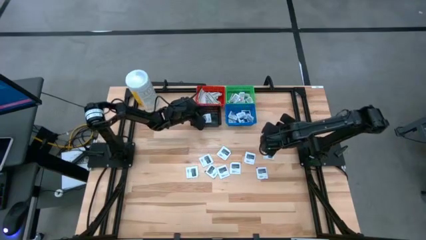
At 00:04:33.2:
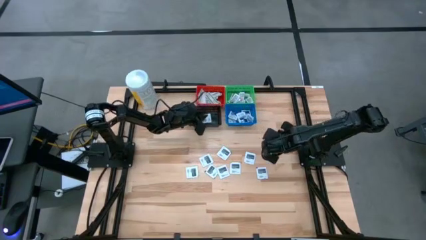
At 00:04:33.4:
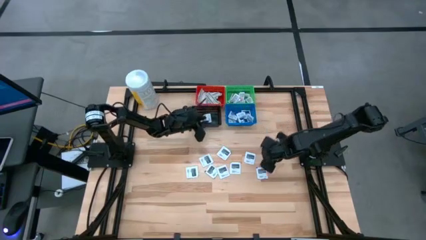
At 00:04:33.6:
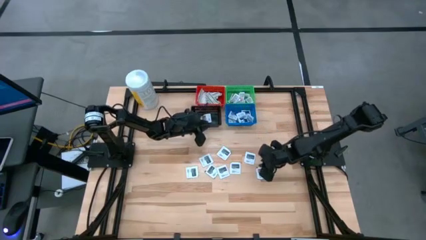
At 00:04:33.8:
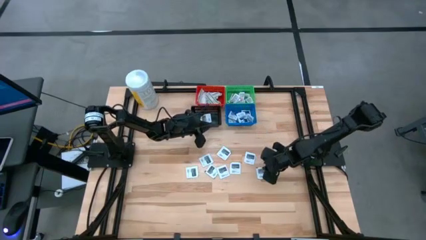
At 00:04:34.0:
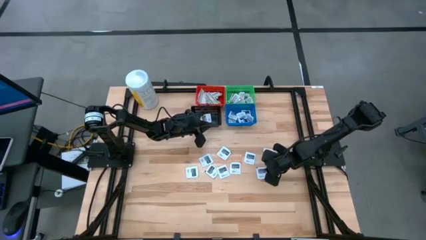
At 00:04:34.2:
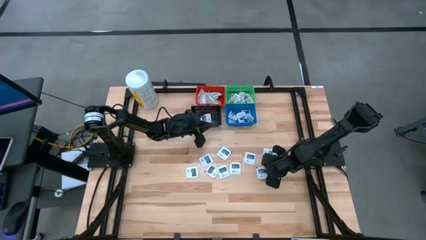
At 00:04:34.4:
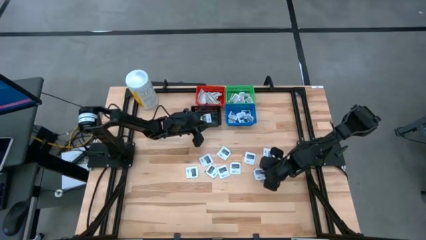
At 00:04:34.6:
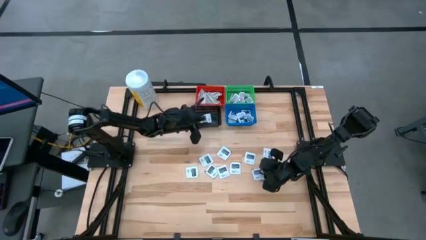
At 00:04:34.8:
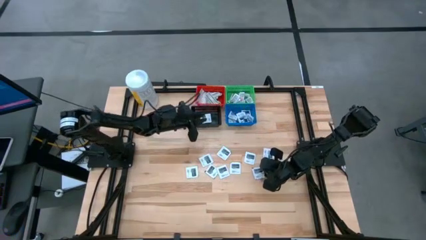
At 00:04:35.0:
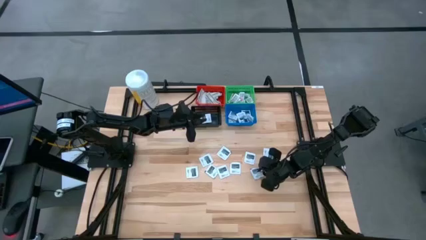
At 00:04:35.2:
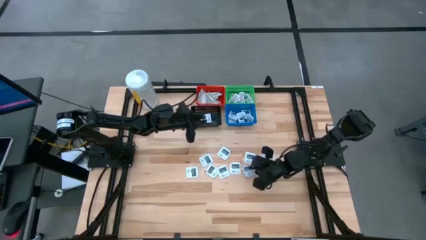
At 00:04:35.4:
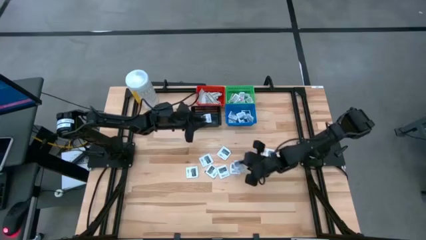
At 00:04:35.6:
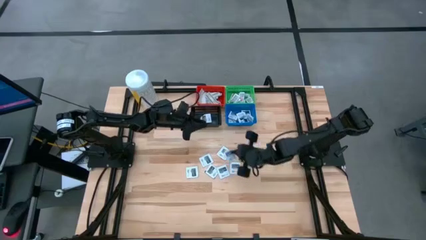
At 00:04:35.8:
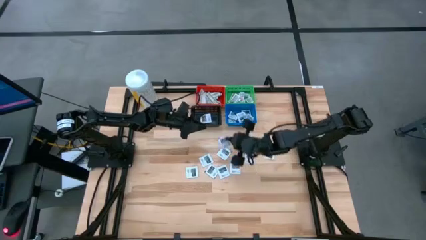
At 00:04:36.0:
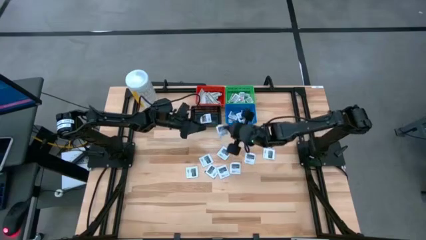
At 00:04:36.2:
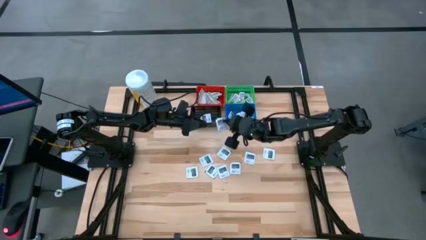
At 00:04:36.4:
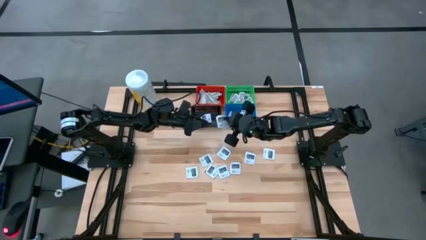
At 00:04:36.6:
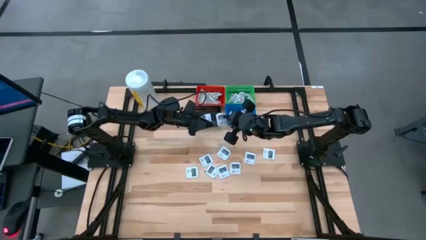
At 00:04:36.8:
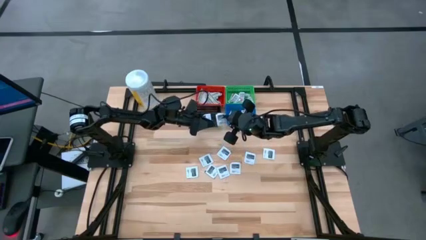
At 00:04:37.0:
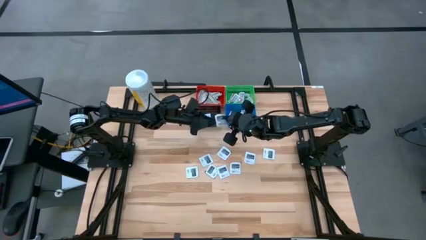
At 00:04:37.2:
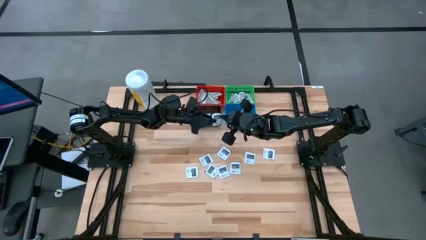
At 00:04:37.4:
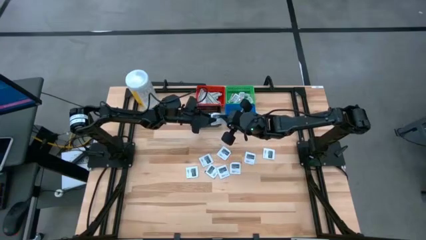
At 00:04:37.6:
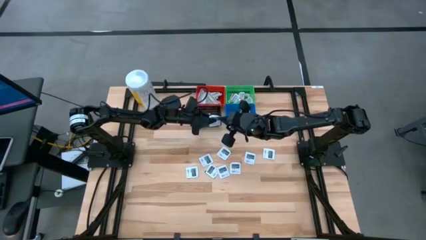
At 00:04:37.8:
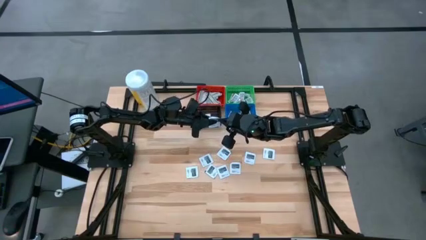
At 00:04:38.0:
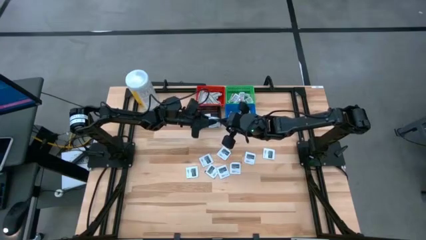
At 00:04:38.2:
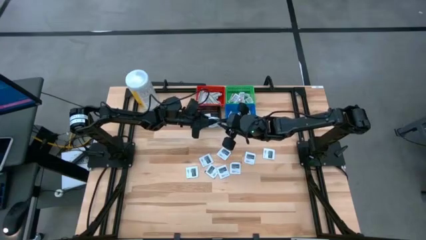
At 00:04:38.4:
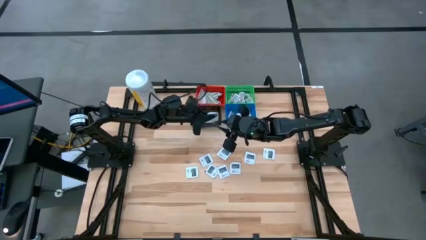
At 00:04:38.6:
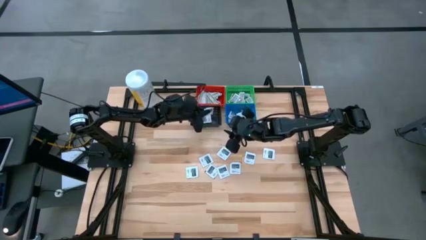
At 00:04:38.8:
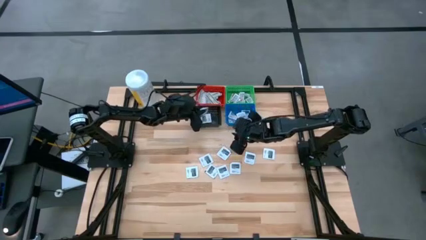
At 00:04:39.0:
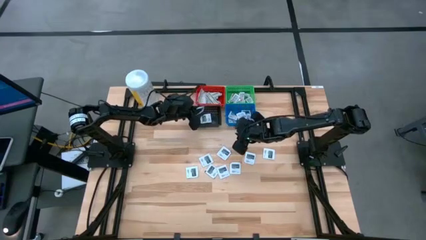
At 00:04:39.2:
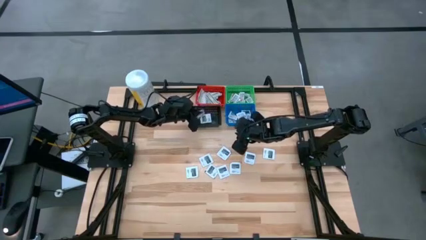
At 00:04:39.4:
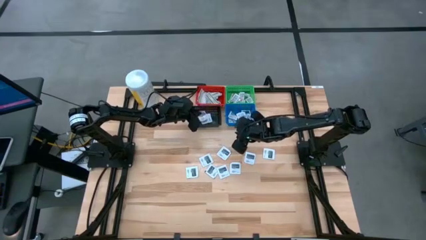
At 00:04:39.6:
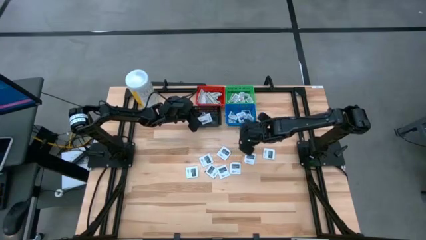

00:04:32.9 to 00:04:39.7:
Task: Pick & Place First Aid Supplies
Put the towelette pack into the black basket

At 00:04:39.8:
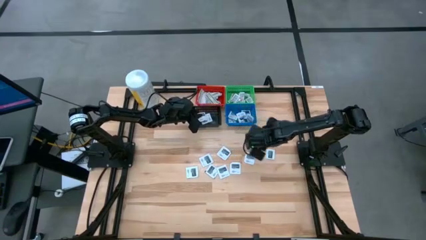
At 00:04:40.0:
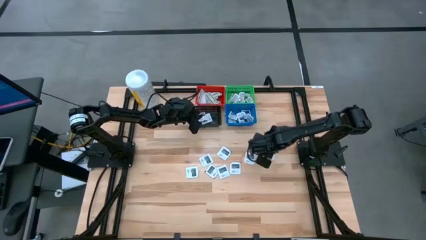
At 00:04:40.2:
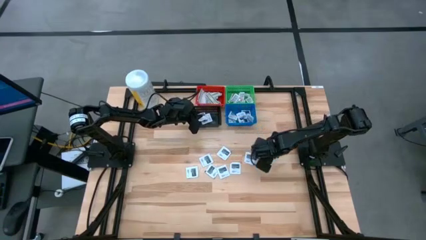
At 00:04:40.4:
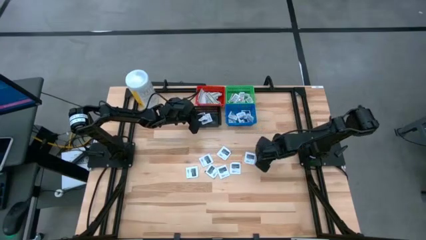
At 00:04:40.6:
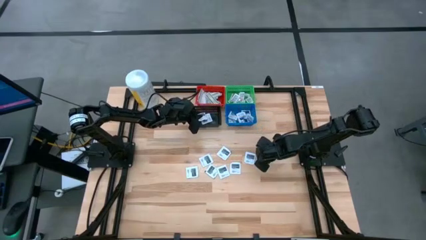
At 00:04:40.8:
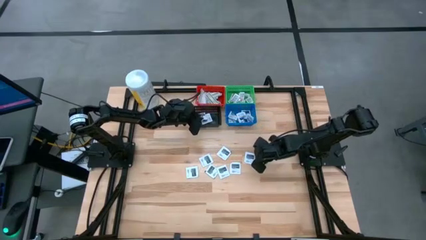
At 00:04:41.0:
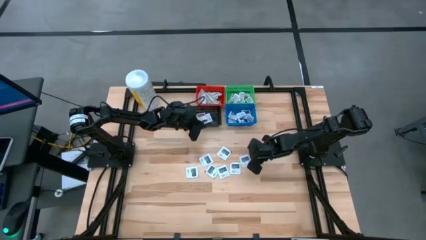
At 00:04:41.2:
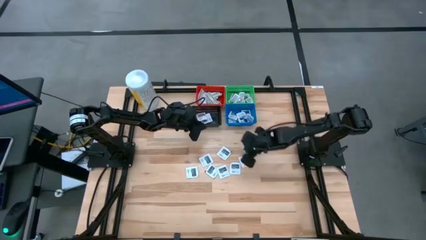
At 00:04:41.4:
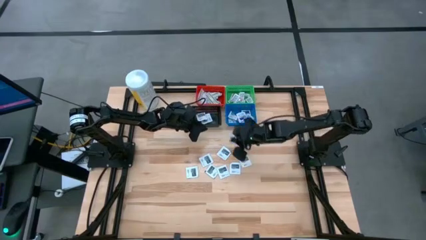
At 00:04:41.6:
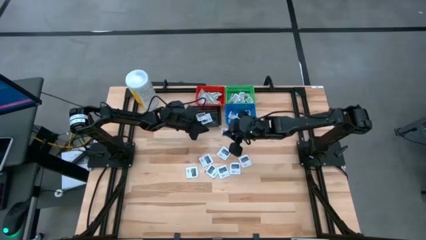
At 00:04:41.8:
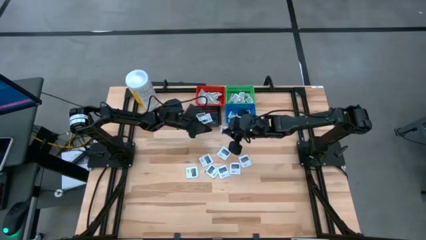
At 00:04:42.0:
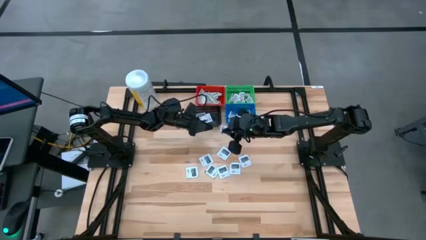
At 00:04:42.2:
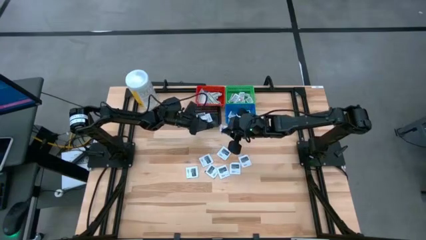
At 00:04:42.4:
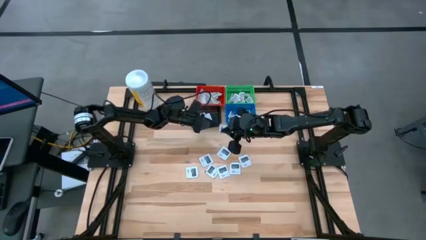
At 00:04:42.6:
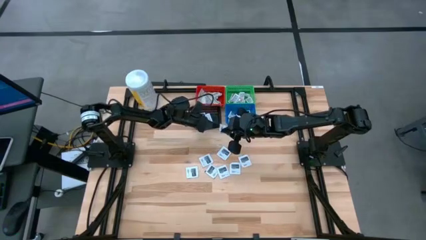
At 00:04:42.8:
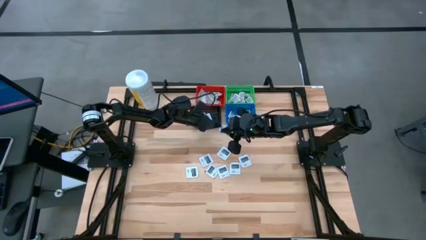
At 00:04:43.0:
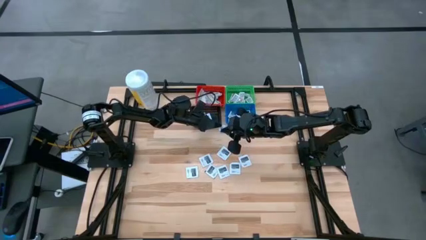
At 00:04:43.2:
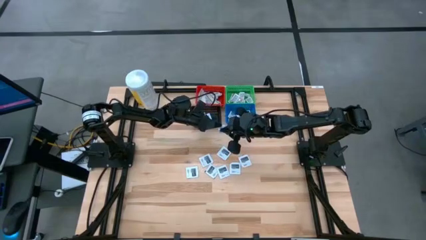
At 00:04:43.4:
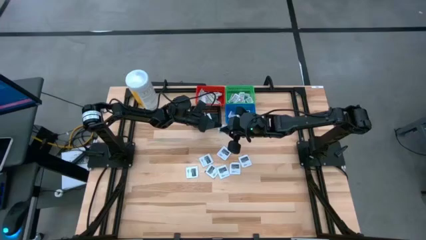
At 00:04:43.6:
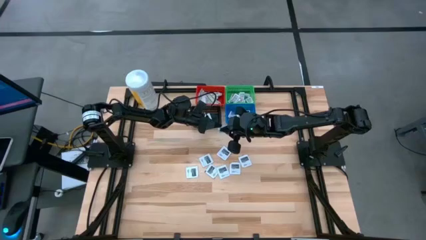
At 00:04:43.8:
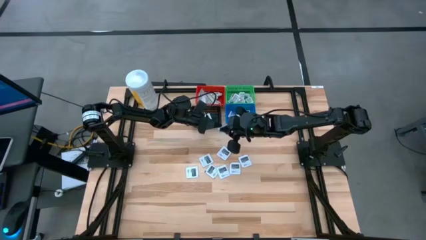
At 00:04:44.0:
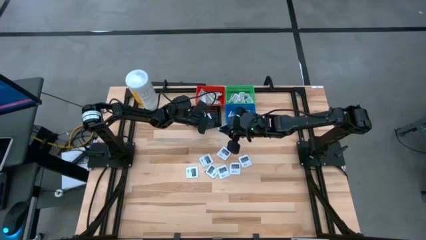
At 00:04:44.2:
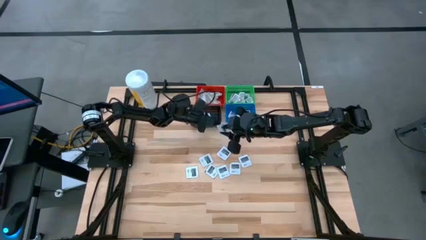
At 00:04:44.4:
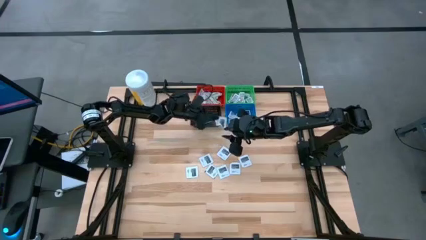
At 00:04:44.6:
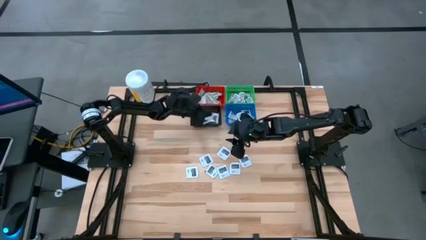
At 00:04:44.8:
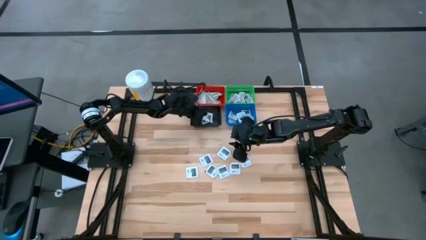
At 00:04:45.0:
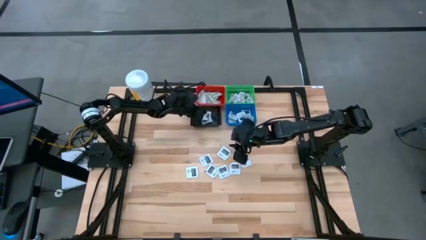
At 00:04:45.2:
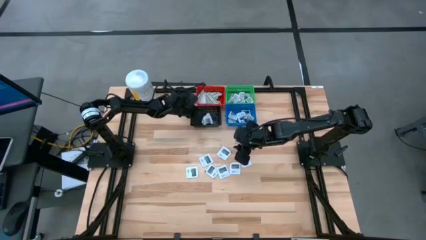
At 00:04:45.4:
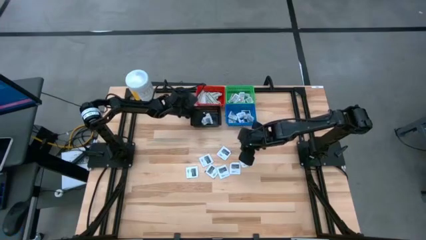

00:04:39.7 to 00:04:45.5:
Put the towelette pack into the black basket

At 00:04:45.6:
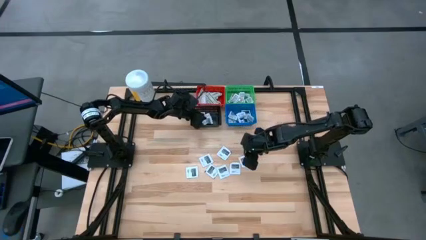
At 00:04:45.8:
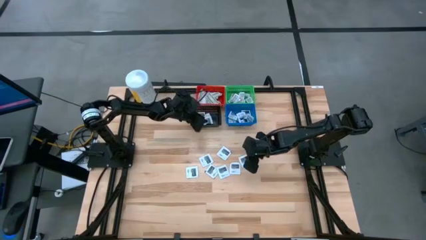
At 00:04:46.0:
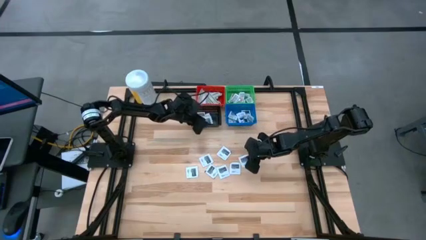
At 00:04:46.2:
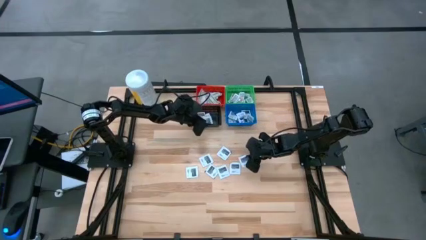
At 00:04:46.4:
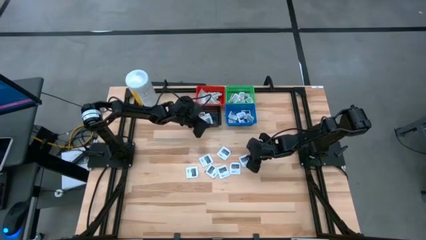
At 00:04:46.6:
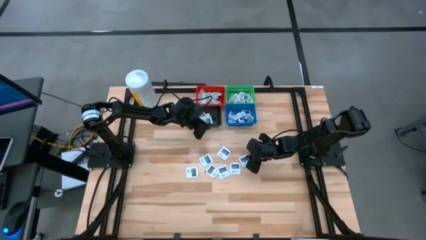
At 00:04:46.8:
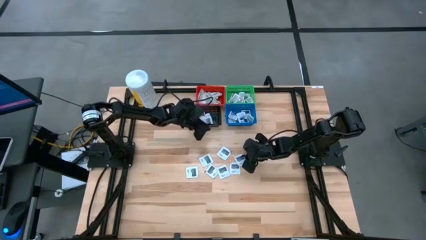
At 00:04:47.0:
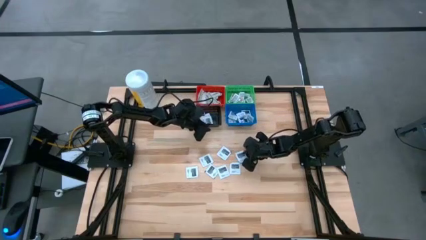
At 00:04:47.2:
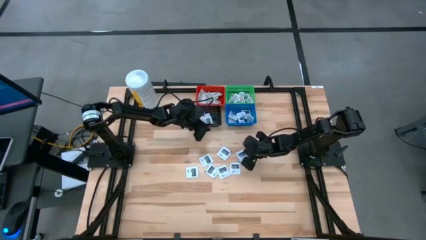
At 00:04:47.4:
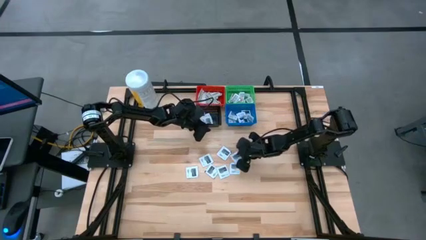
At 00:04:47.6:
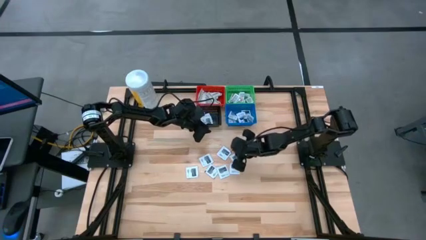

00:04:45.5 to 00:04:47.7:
Put the towelette pack into the black basket
